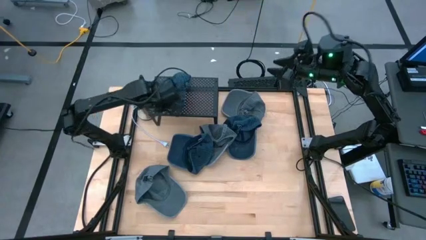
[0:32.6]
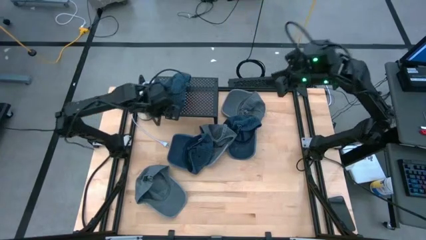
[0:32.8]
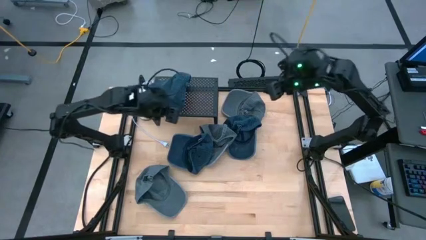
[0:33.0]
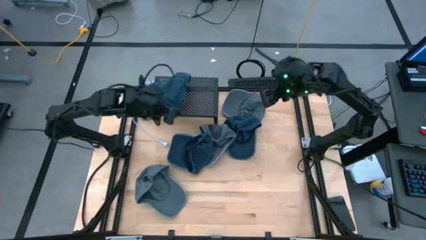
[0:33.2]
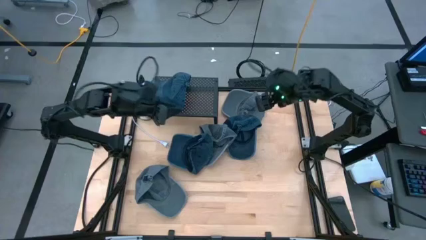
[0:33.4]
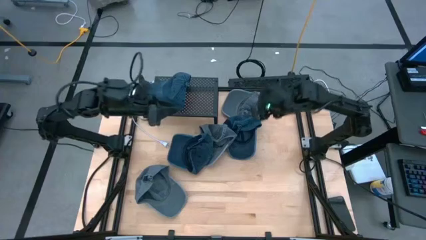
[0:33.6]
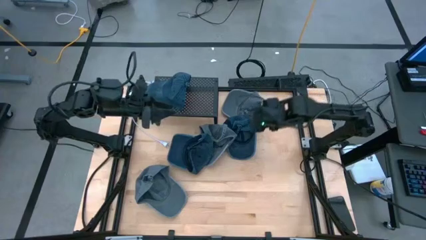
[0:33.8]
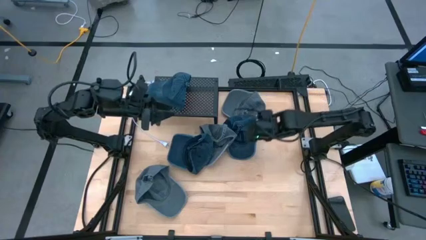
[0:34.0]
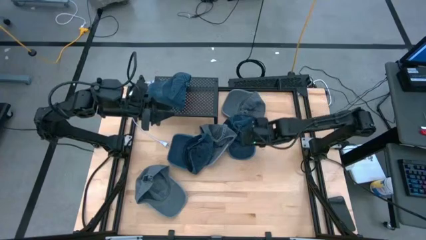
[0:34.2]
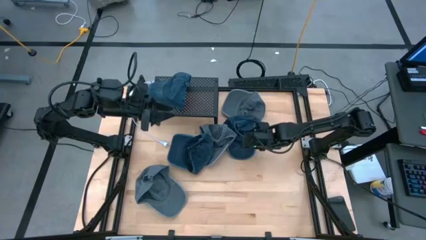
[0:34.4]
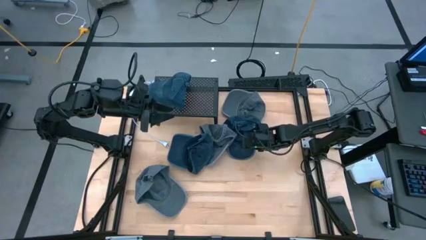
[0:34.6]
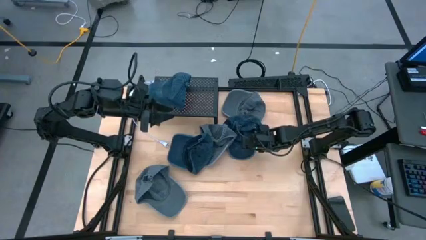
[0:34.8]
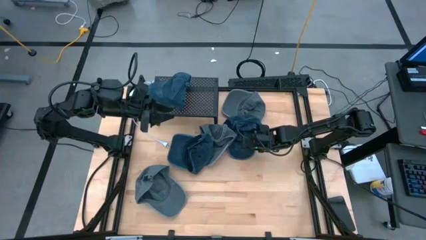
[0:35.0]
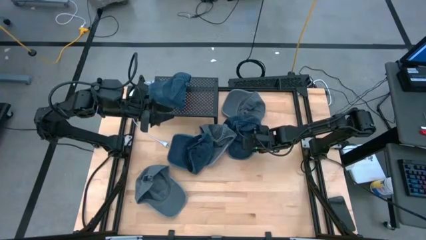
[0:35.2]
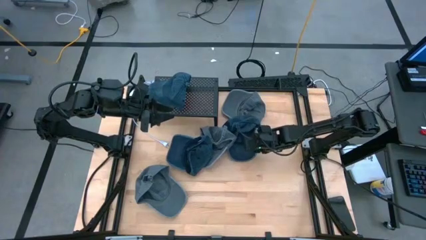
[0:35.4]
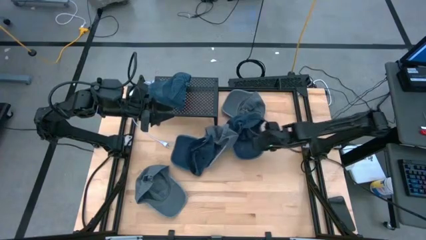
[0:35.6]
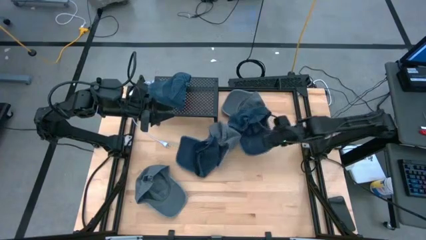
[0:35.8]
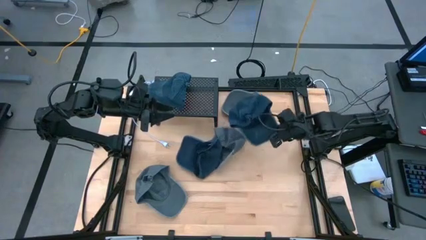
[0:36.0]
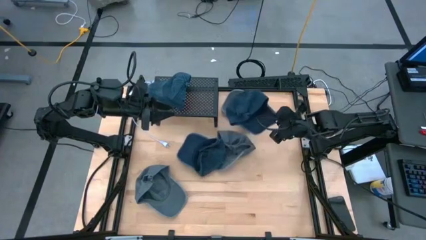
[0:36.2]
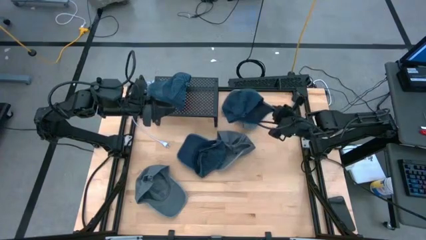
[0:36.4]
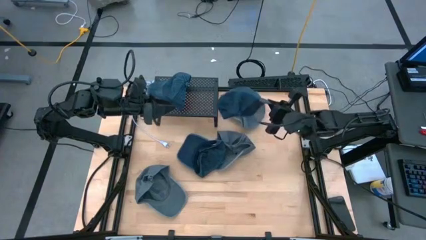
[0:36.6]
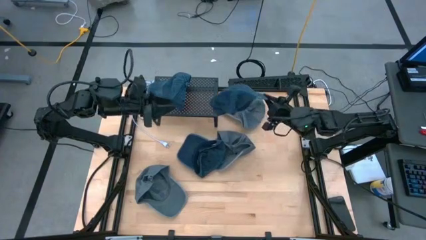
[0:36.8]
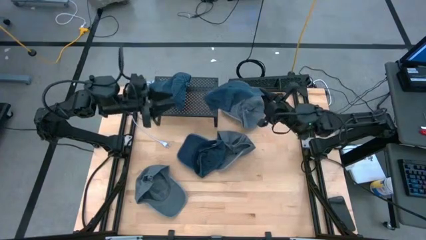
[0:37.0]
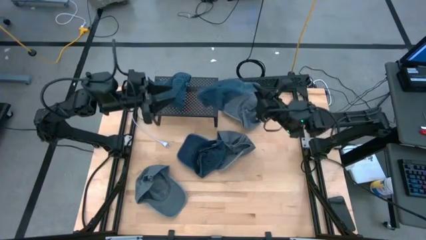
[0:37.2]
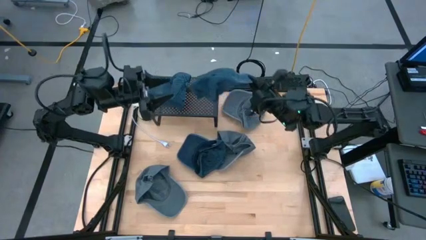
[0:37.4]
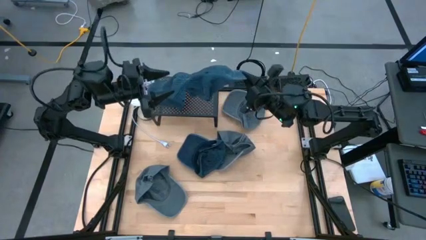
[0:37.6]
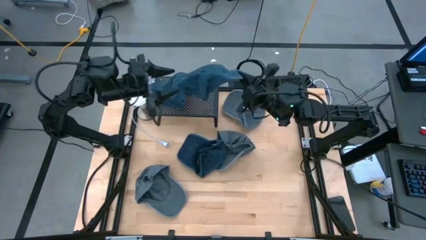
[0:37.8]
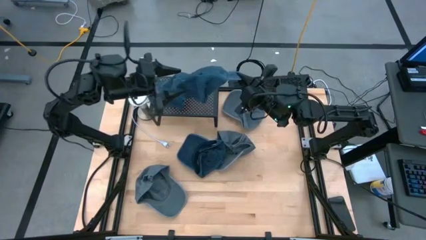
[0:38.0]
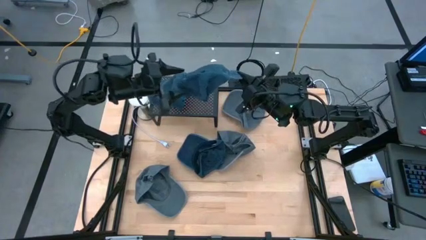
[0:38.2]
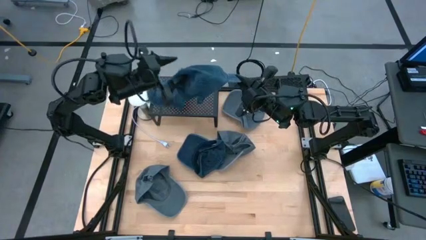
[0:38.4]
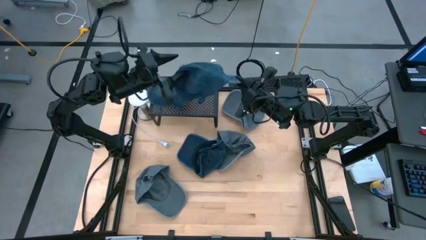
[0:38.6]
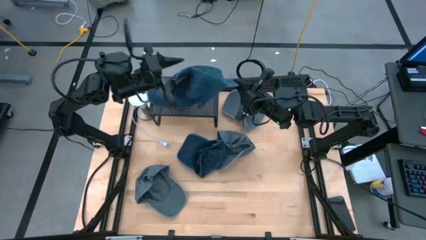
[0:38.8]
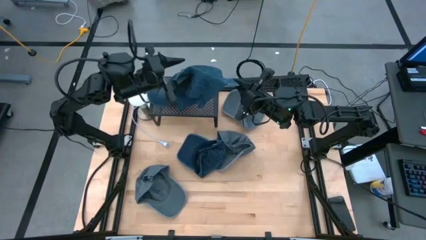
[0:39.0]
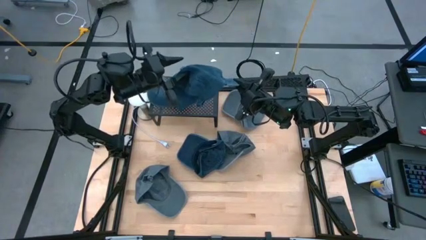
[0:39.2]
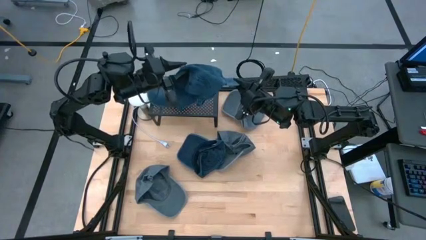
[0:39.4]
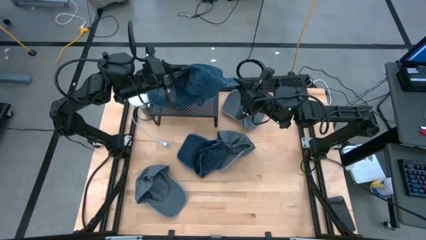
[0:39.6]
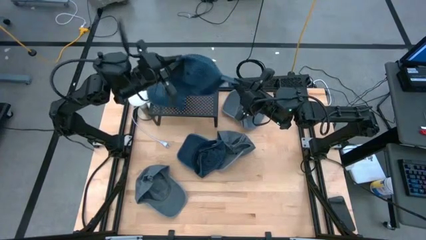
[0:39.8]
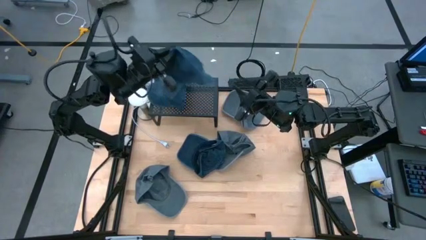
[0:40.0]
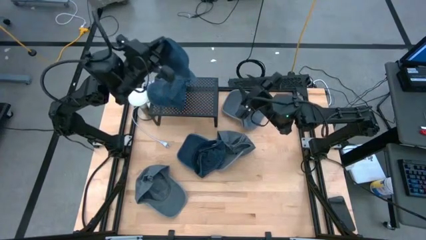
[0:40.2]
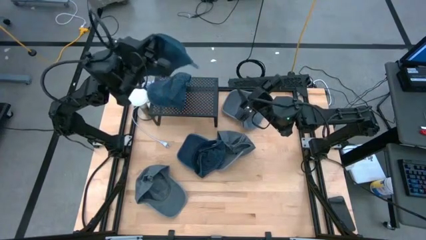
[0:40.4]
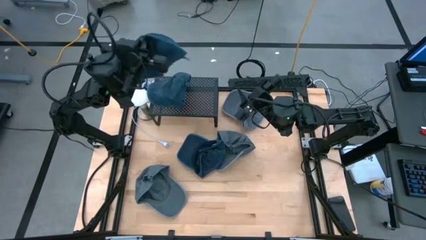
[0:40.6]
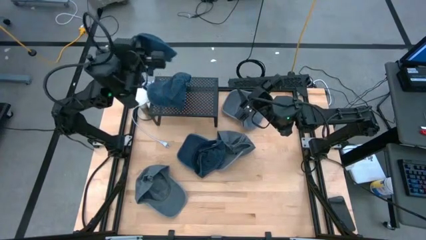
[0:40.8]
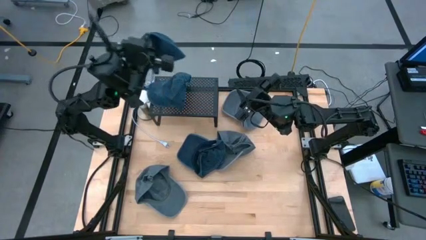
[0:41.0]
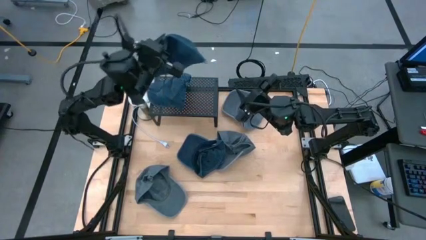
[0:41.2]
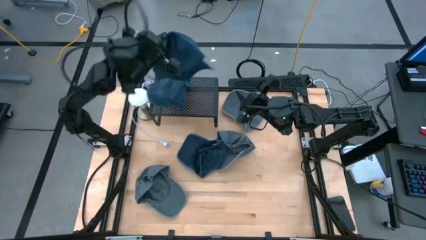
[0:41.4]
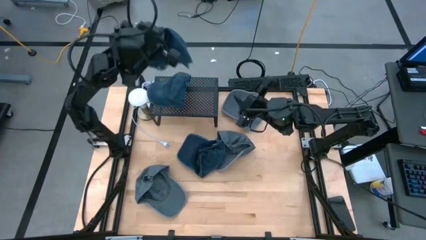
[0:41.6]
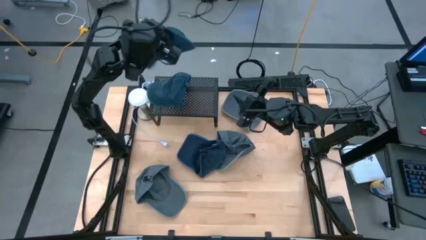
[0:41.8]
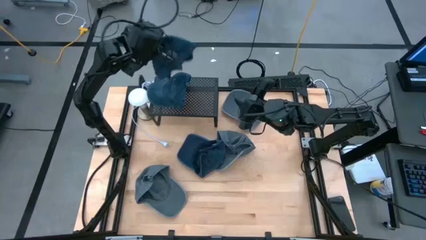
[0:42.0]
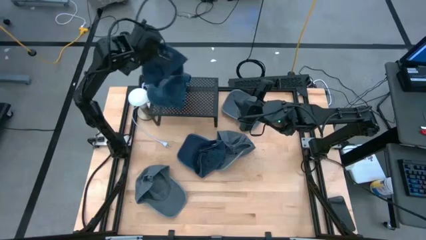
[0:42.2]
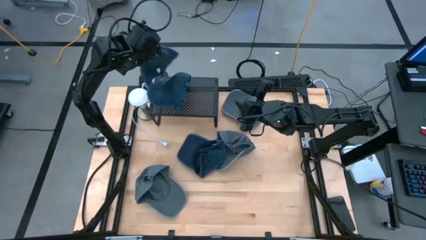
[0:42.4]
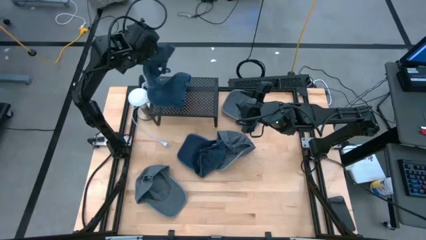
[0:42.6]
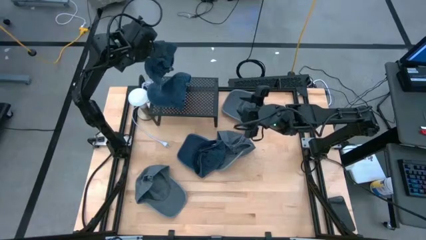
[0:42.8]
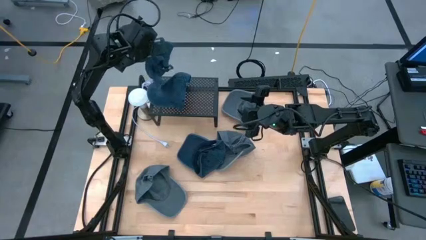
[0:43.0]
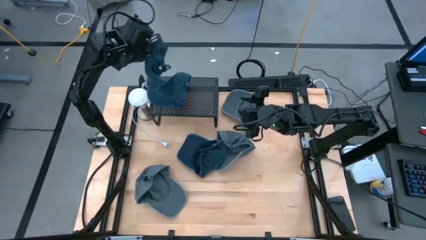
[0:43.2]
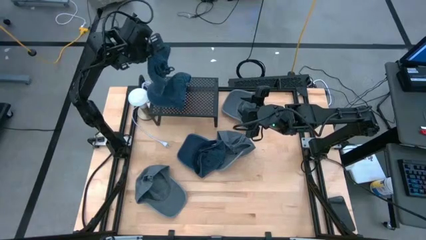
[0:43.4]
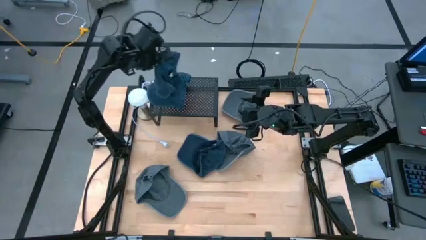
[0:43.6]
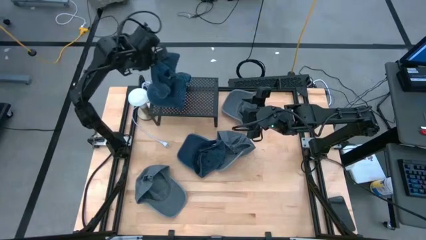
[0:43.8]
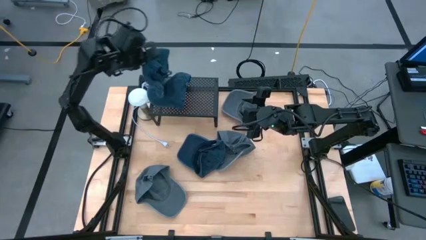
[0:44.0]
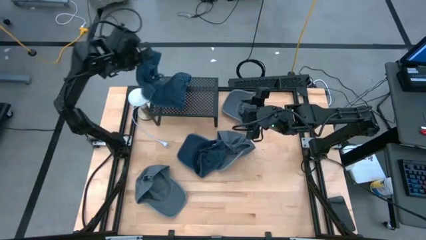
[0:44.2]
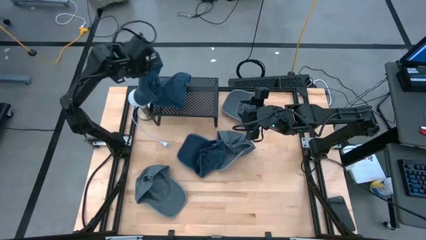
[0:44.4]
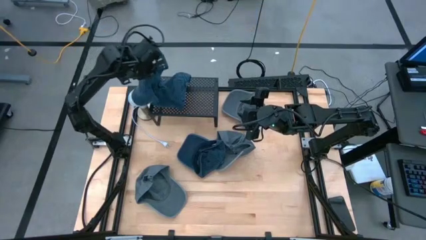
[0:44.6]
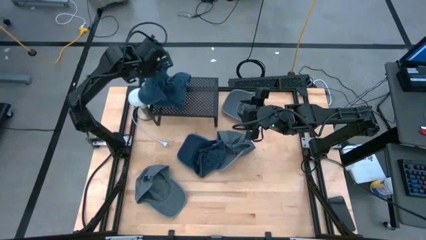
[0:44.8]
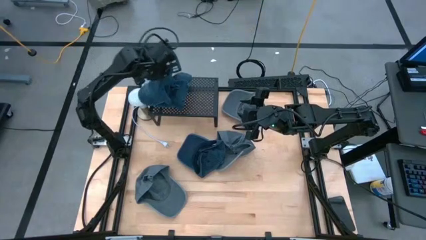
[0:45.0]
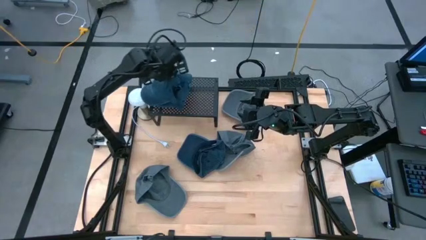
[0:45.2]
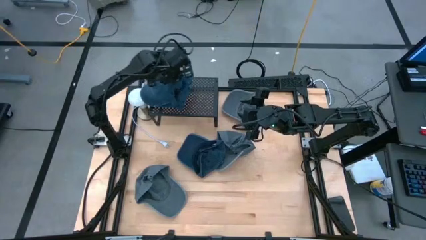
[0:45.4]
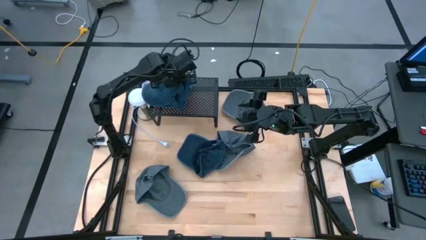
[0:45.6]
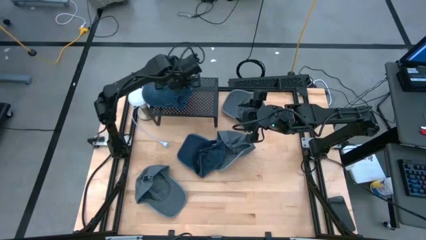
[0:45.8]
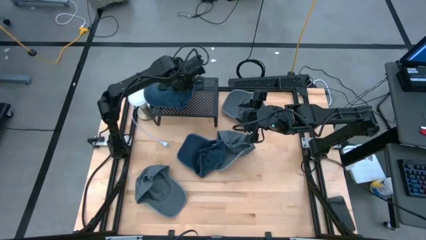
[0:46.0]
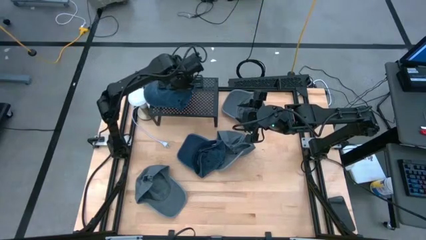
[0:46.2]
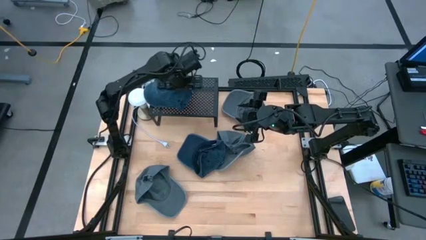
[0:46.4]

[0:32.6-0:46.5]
Task: Pick & Place hat
Stack the right blue cap on the other blue cap on the shelf
